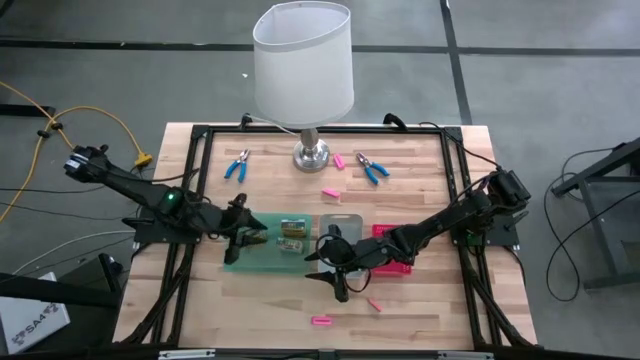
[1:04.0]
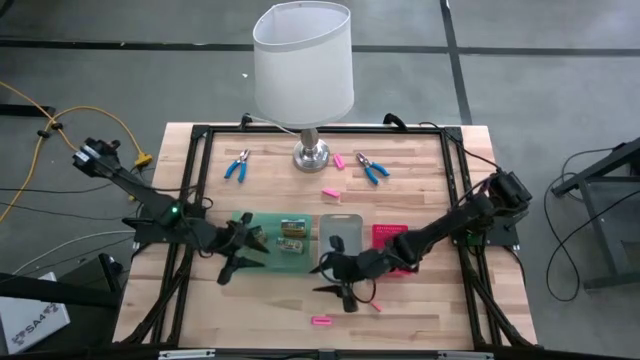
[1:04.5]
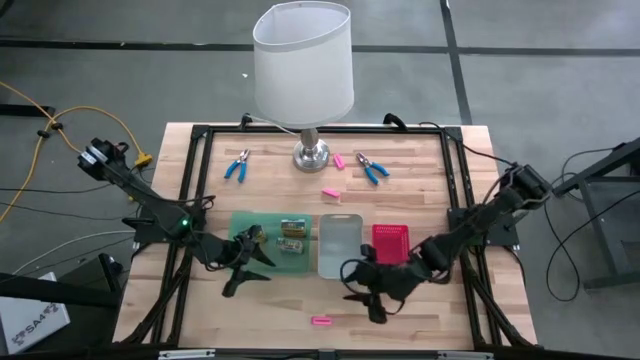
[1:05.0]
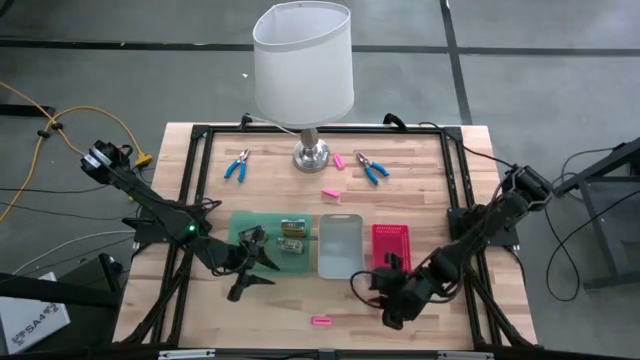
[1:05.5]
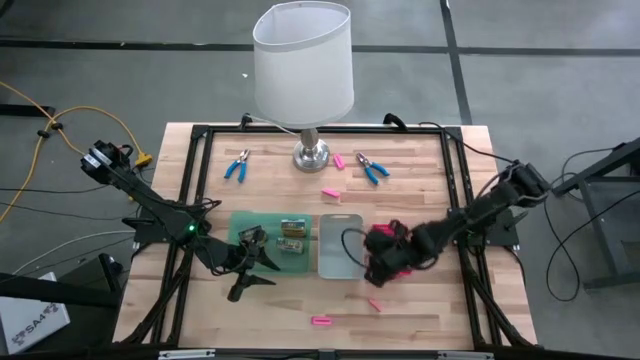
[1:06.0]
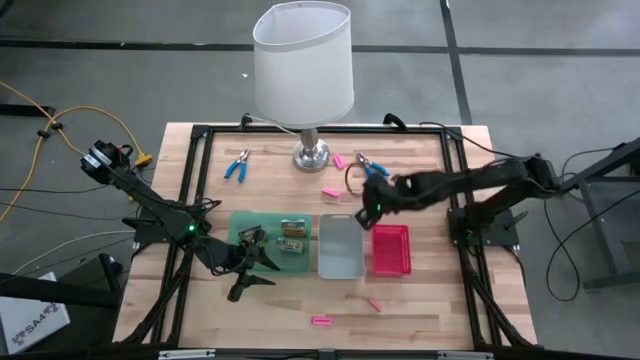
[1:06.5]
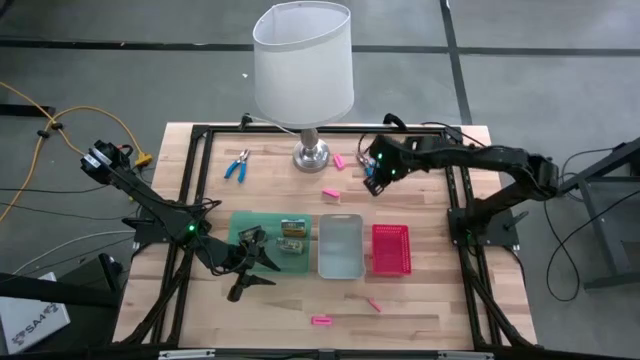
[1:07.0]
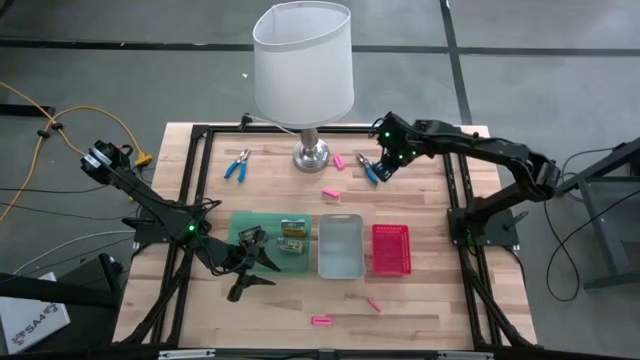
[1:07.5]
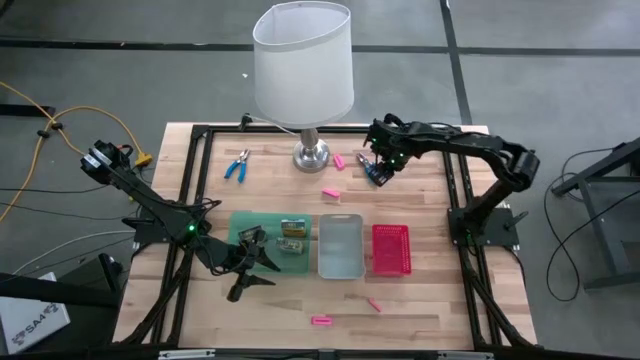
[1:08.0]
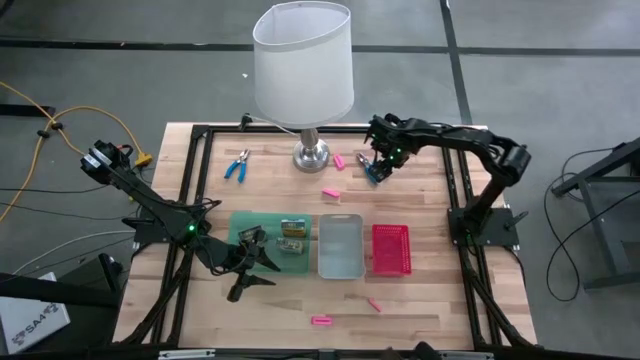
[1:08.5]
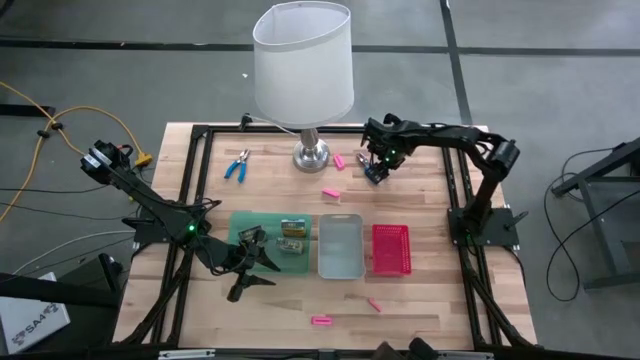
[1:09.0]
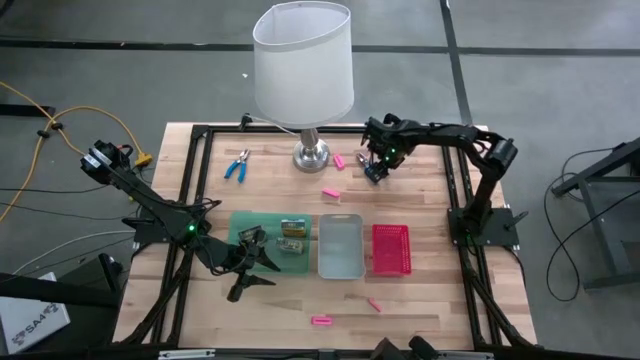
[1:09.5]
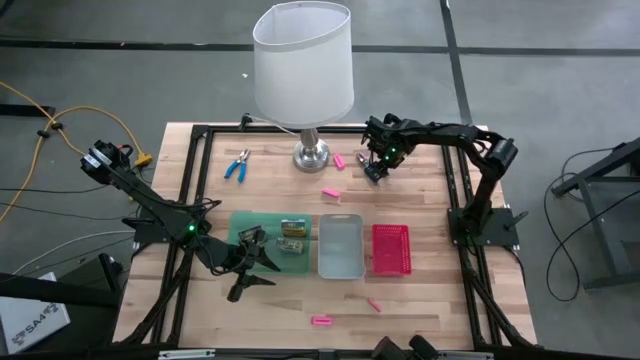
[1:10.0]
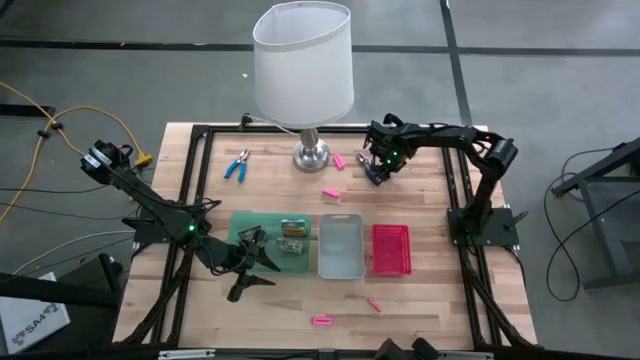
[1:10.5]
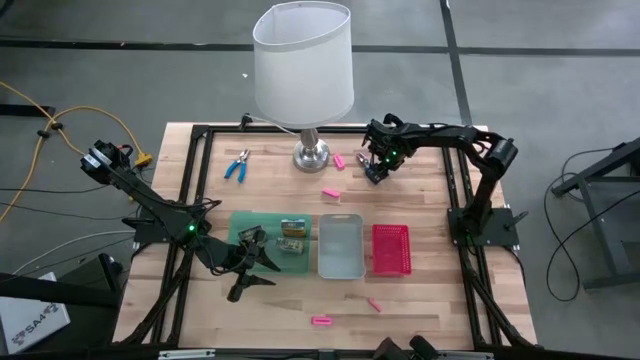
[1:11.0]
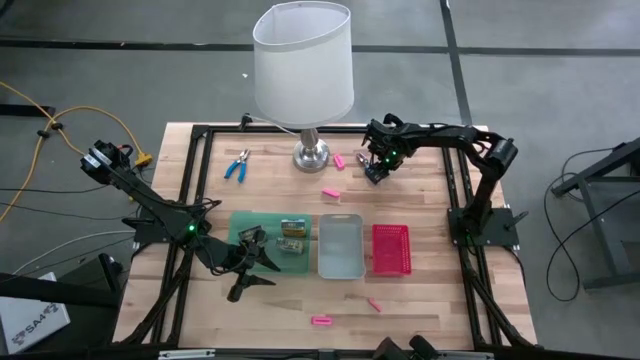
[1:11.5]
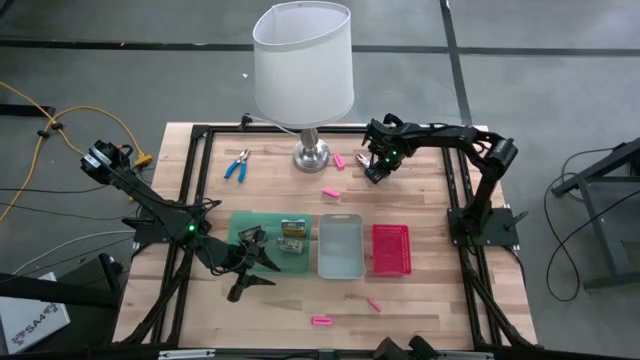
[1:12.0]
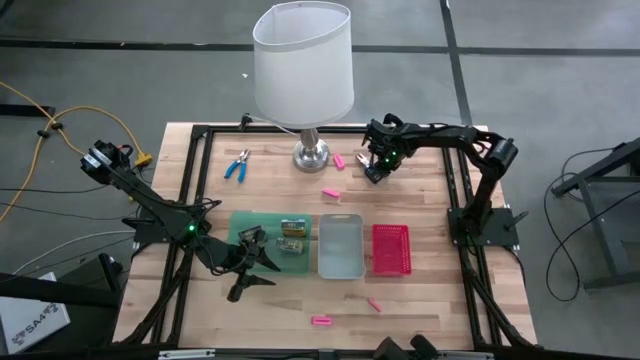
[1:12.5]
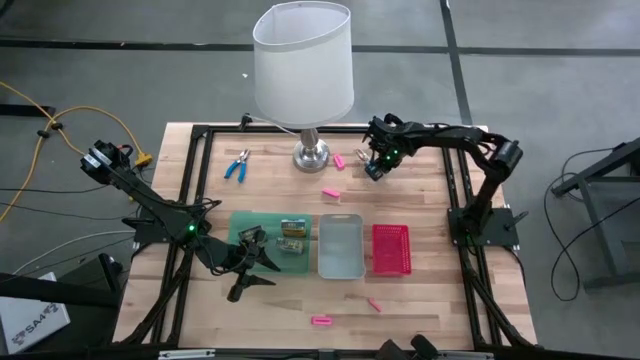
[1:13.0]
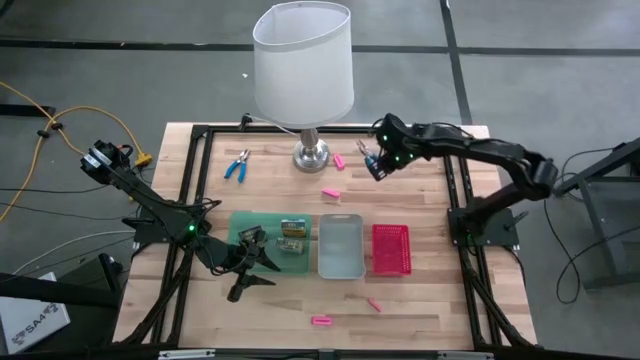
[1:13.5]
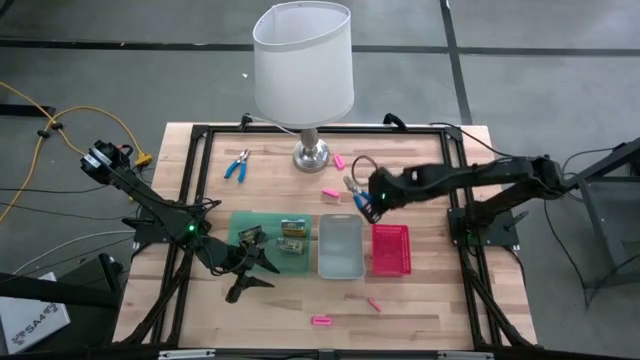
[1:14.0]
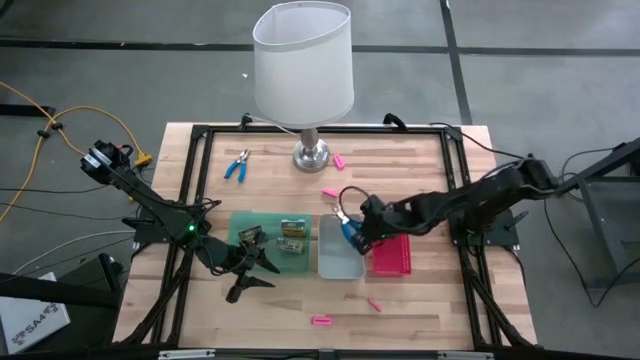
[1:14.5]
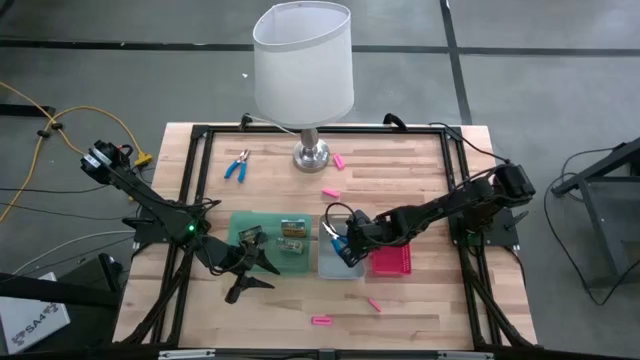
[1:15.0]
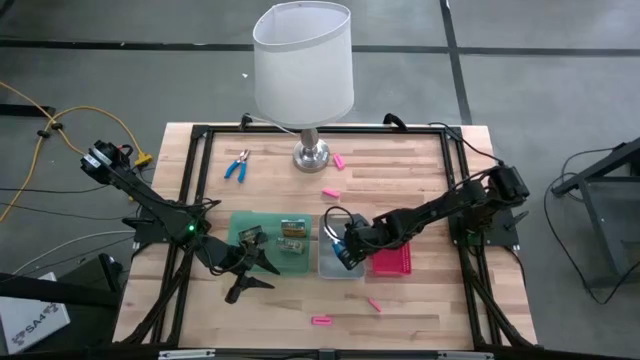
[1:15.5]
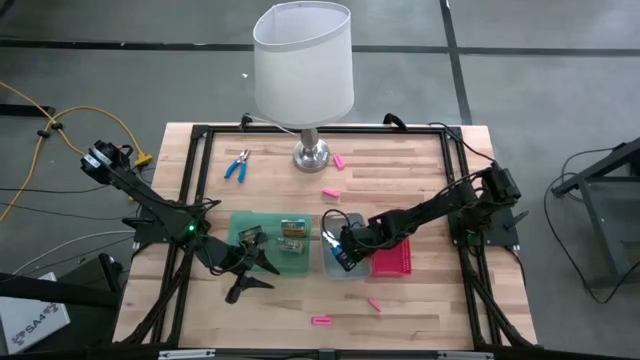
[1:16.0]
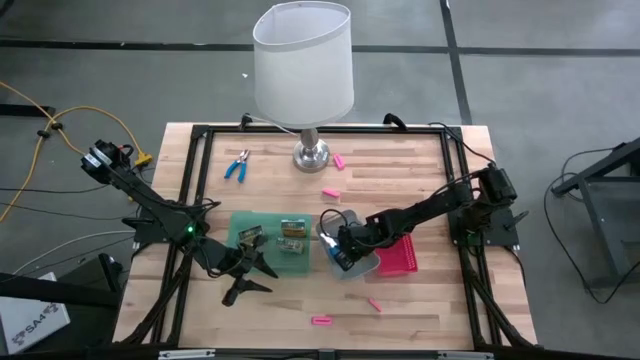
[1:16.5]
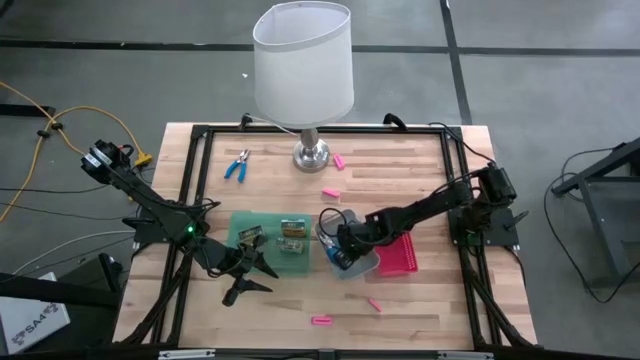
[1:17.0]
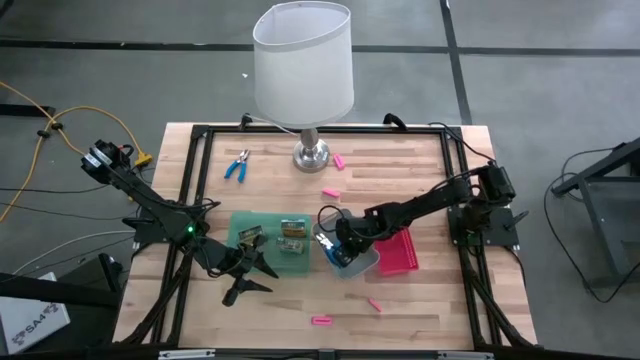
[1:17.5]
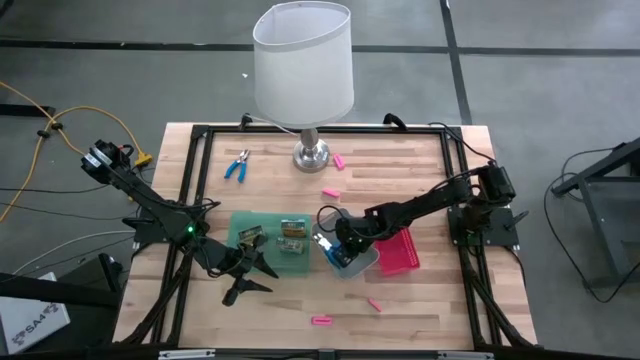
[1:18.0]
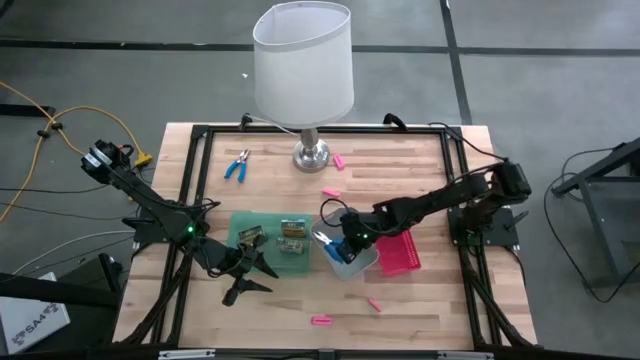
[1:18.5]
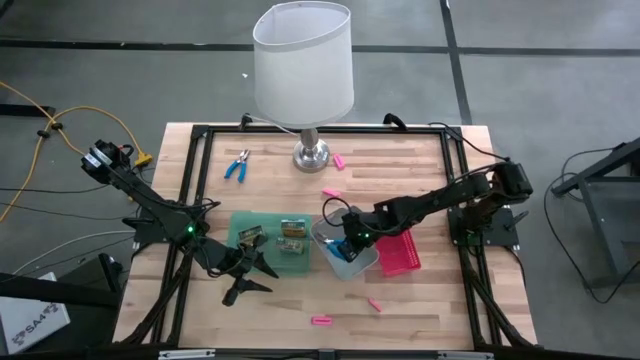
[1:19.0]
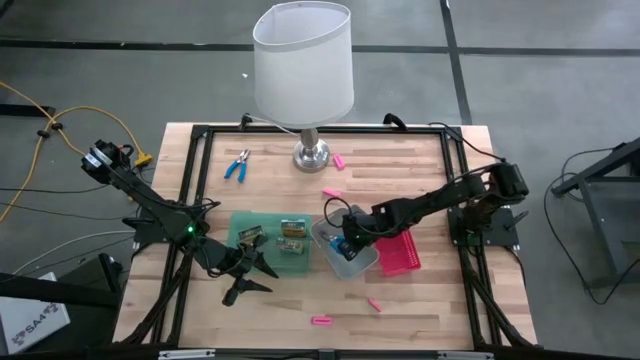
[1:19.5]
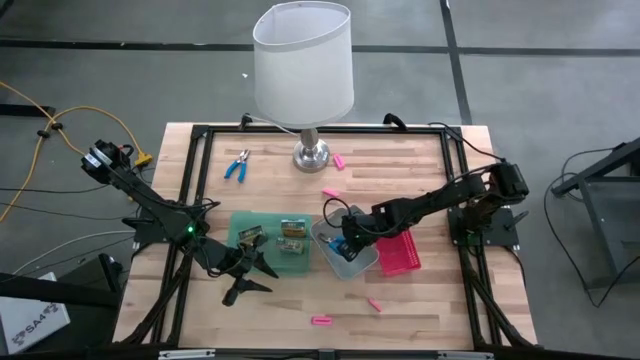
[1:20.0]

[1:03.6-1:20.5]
Task: Pick & Place School Supplies
Put the blue hole puncher into the gray bin

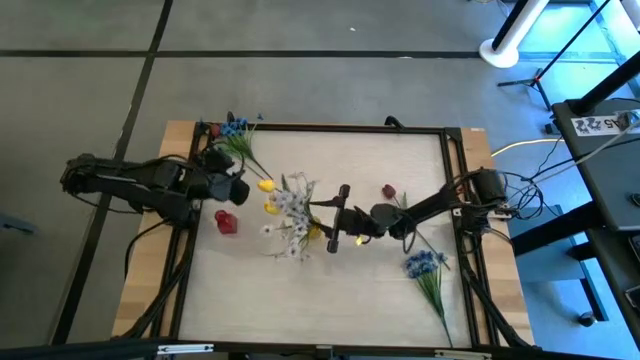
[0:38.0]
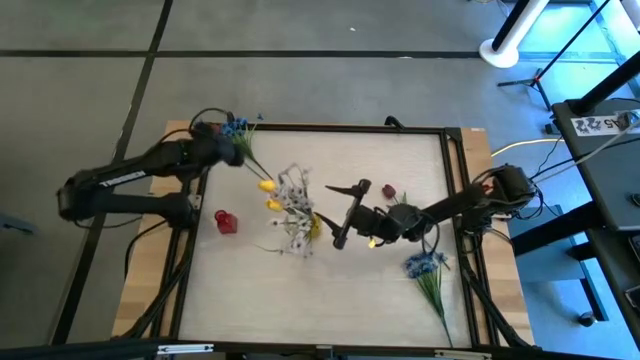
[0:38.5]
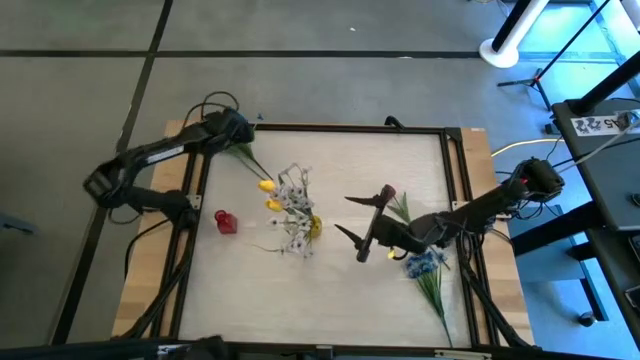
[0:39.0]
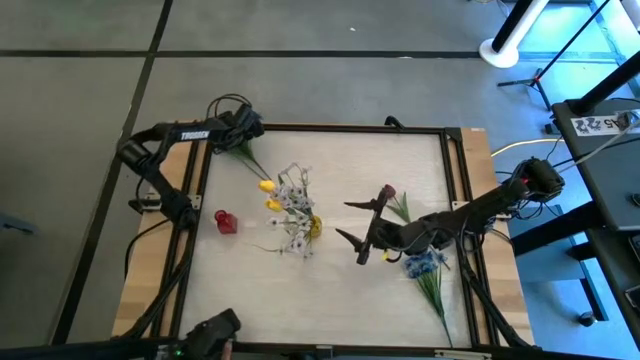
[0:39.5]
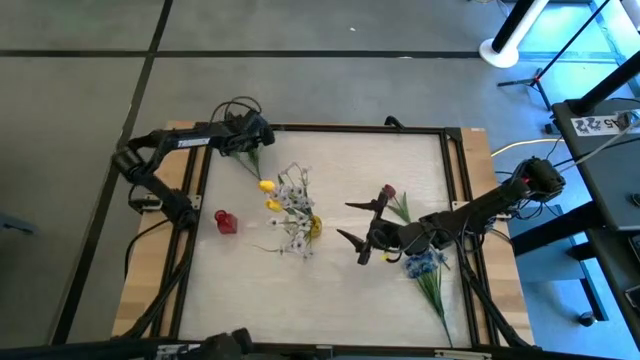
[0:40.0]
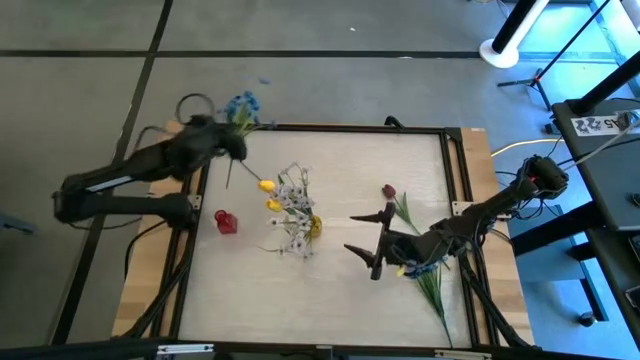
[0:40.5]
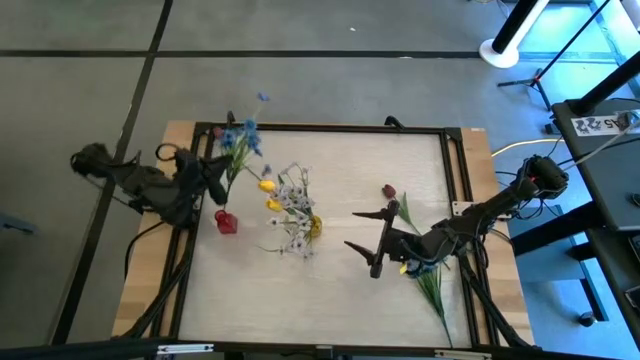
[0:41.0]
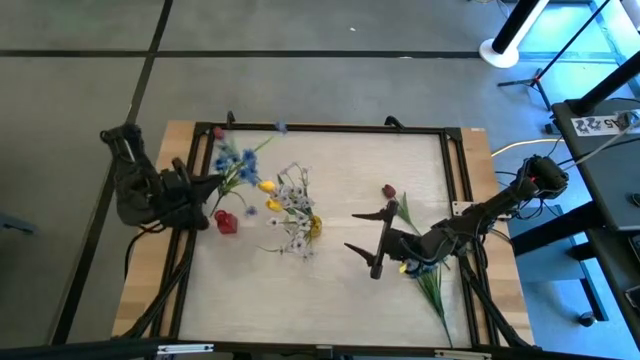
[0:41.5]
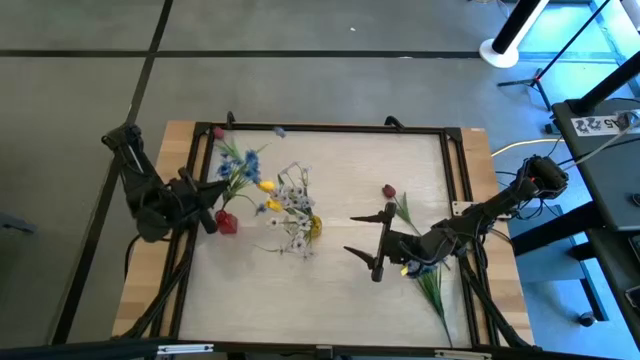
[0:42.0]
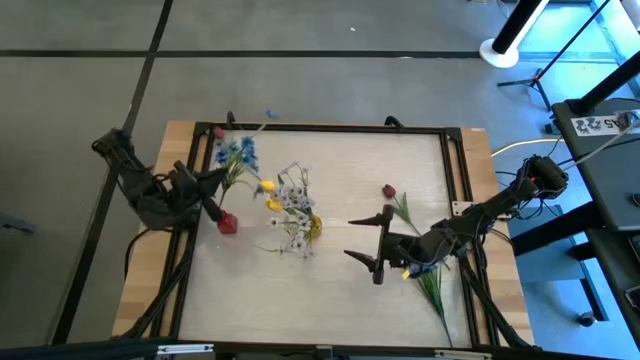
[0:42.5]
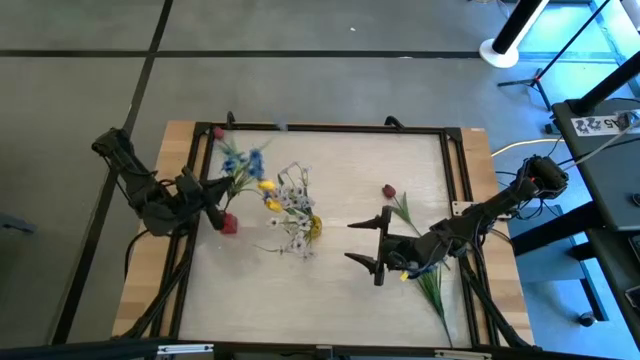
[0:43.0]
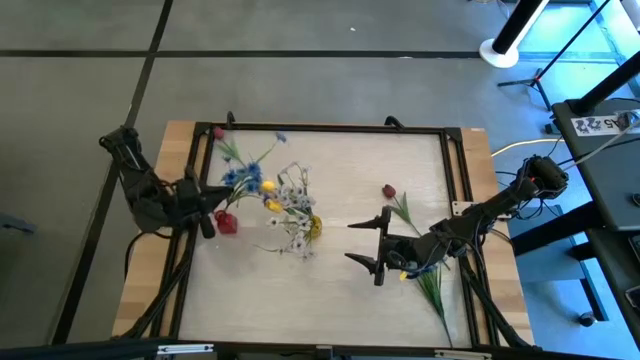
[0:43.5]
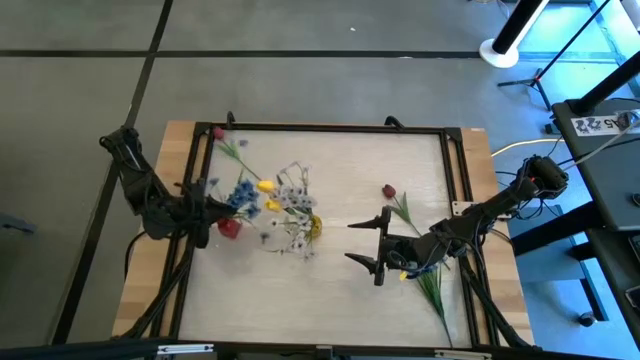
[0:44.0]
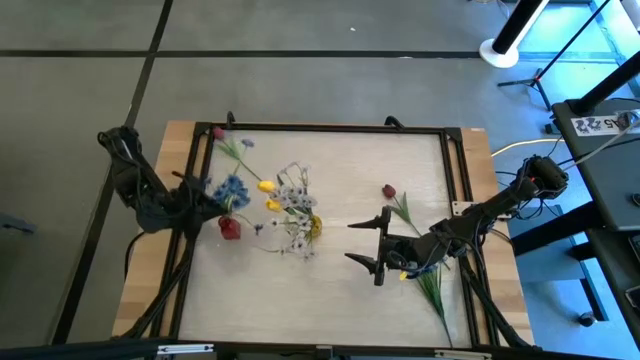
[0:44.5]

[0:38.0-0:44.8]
Task: Sort flowers into vase by color
Put the top blue flowers into the red flower vase
